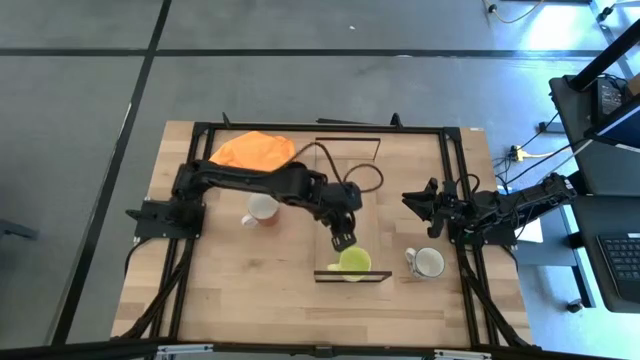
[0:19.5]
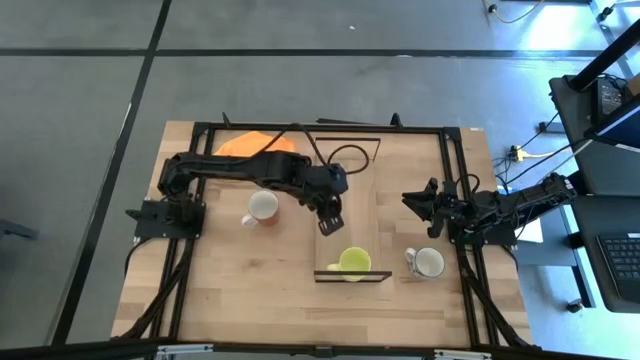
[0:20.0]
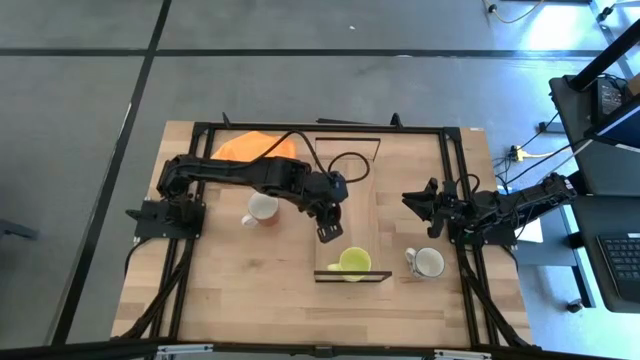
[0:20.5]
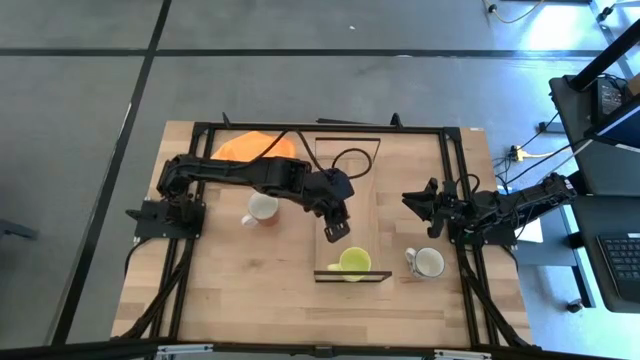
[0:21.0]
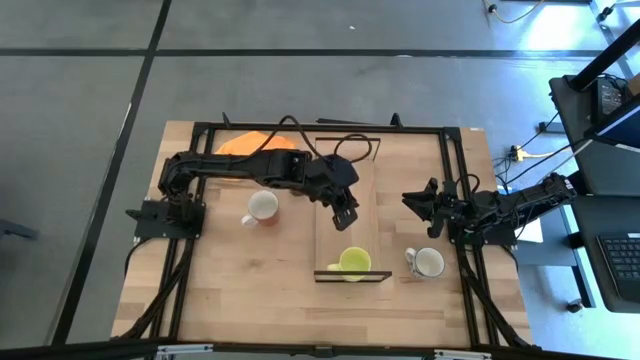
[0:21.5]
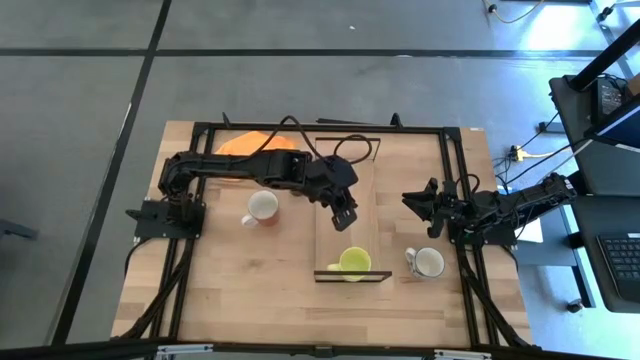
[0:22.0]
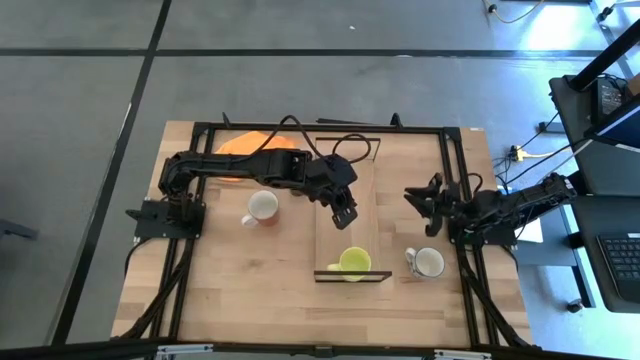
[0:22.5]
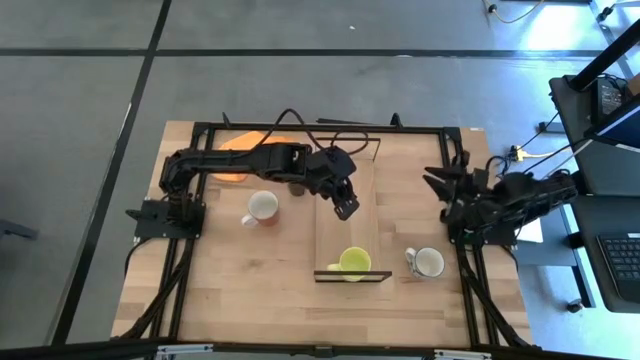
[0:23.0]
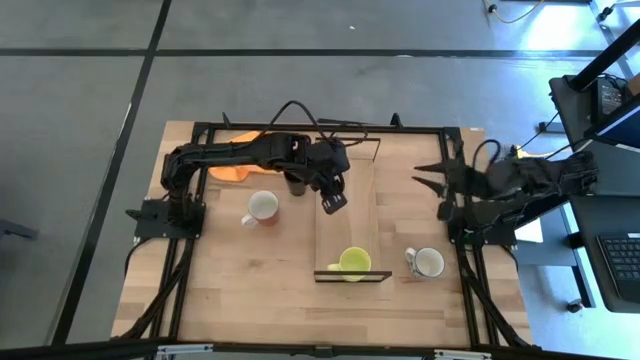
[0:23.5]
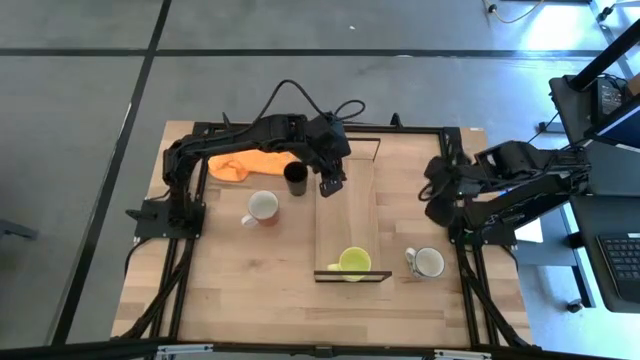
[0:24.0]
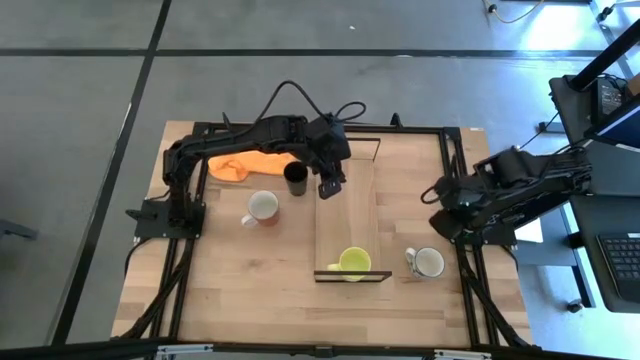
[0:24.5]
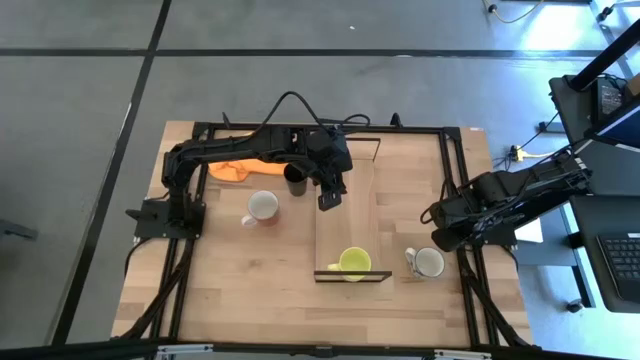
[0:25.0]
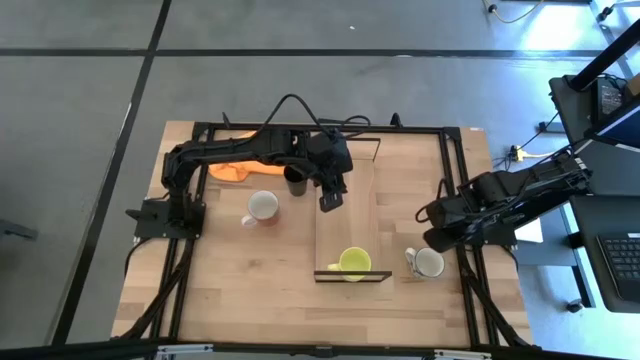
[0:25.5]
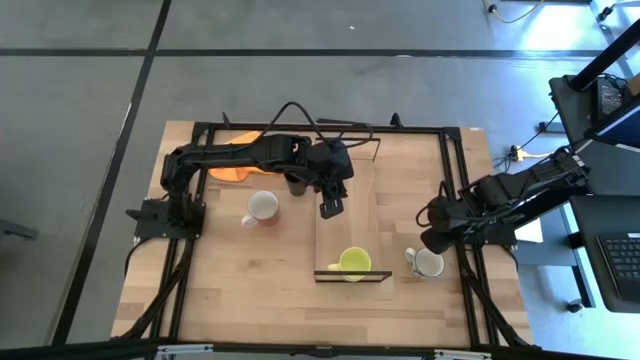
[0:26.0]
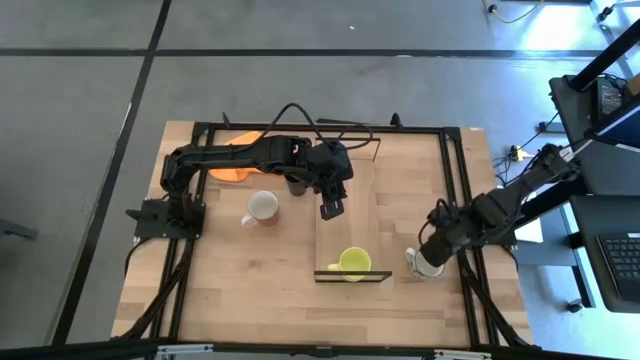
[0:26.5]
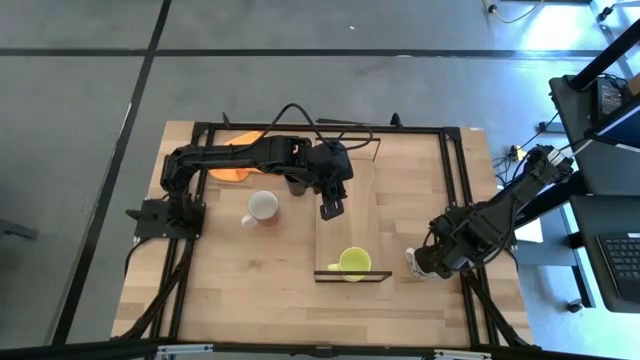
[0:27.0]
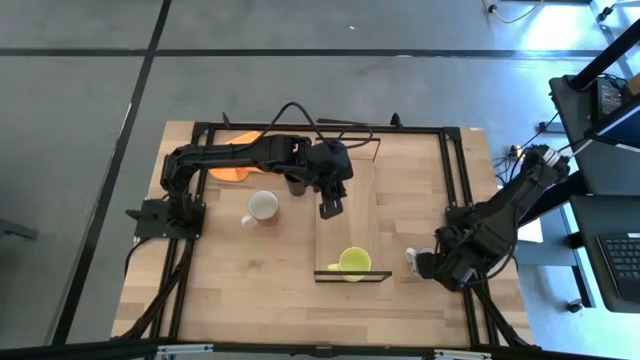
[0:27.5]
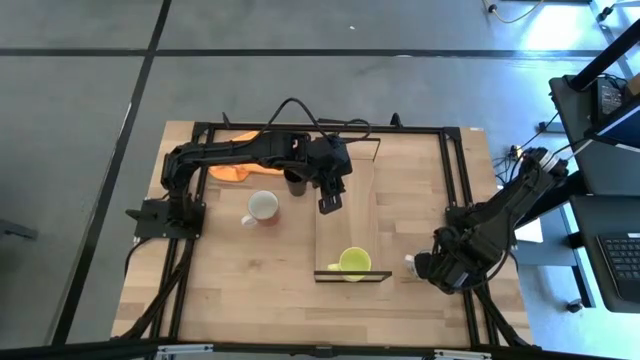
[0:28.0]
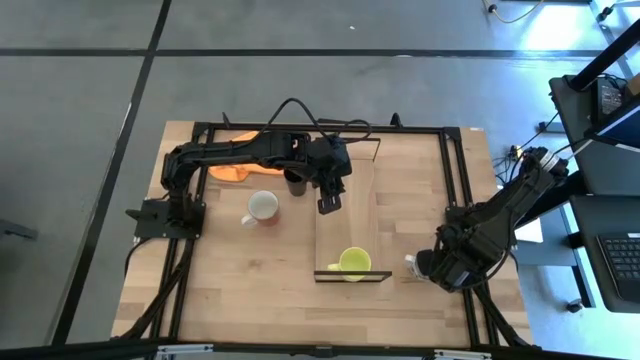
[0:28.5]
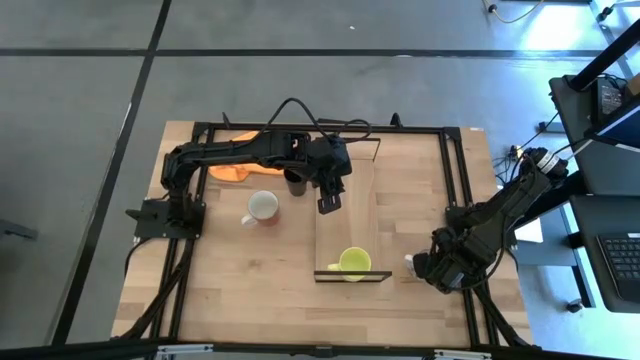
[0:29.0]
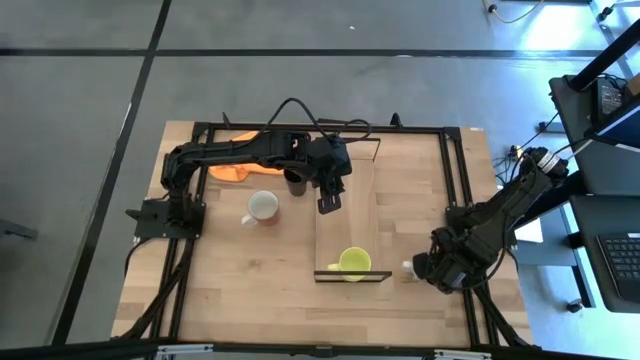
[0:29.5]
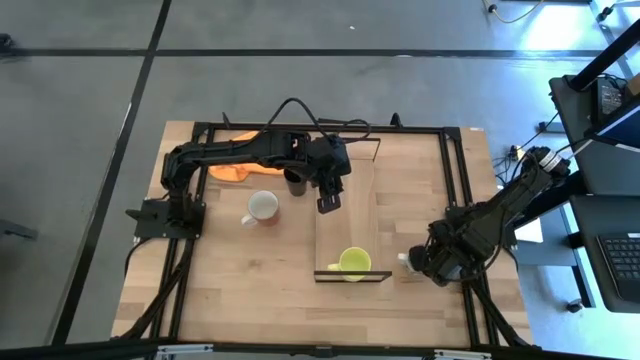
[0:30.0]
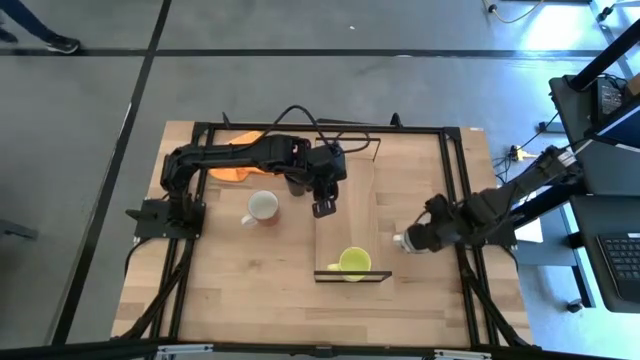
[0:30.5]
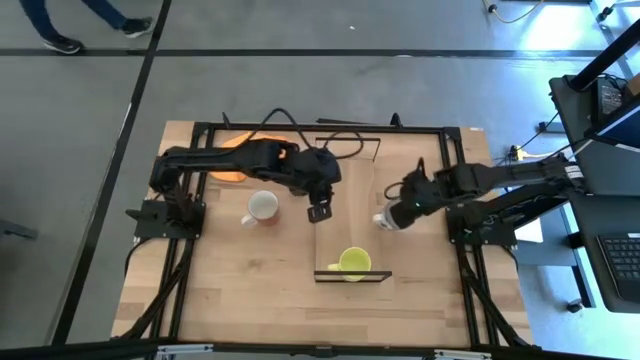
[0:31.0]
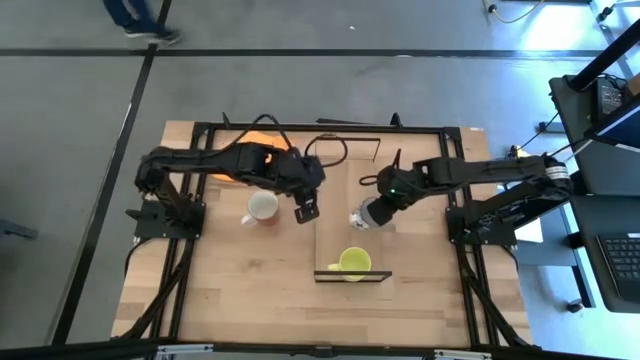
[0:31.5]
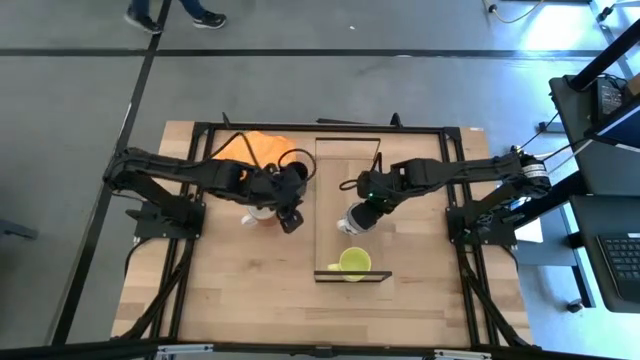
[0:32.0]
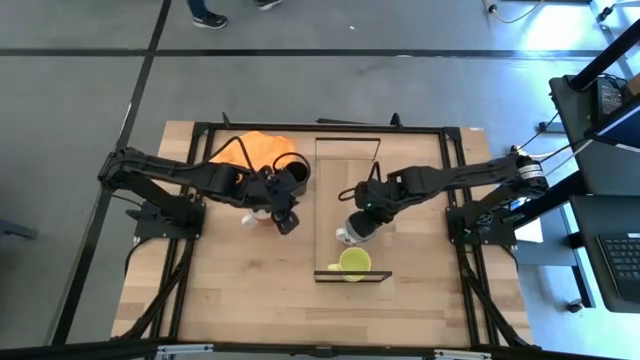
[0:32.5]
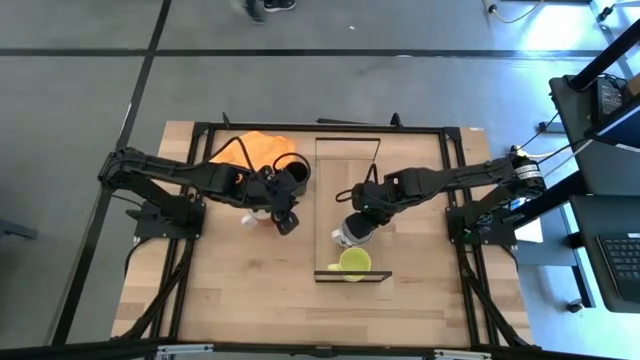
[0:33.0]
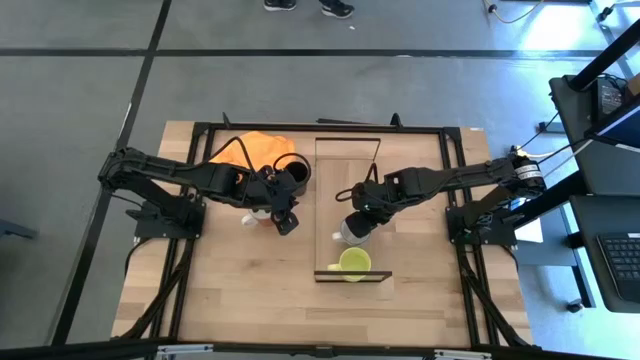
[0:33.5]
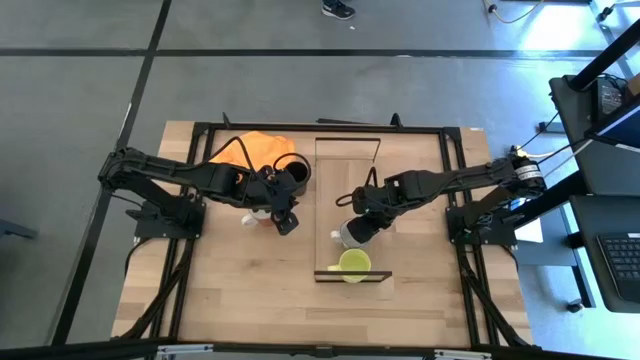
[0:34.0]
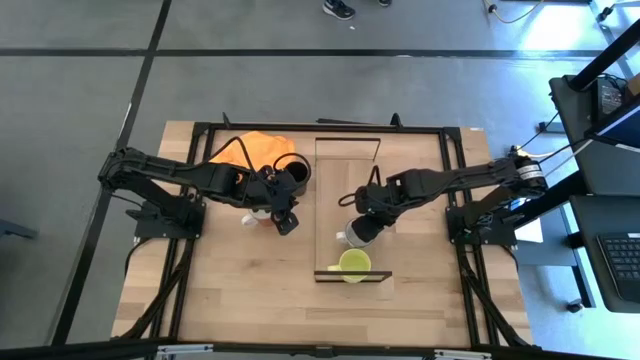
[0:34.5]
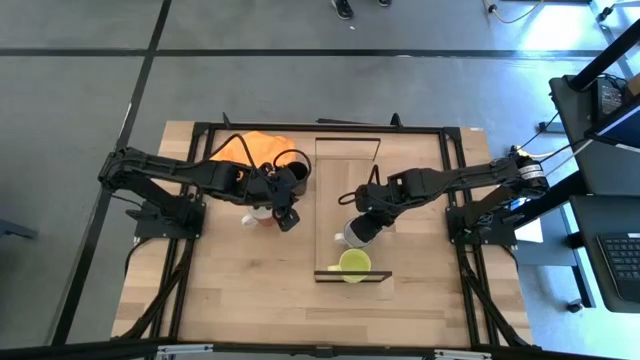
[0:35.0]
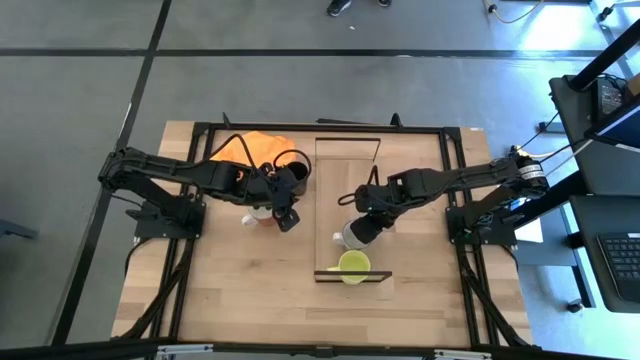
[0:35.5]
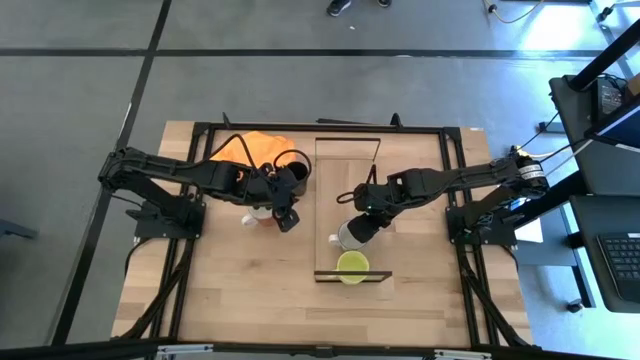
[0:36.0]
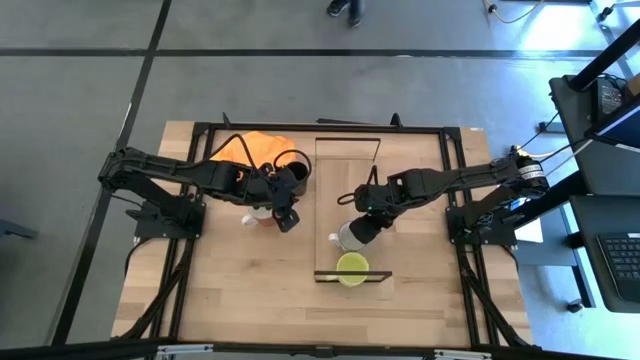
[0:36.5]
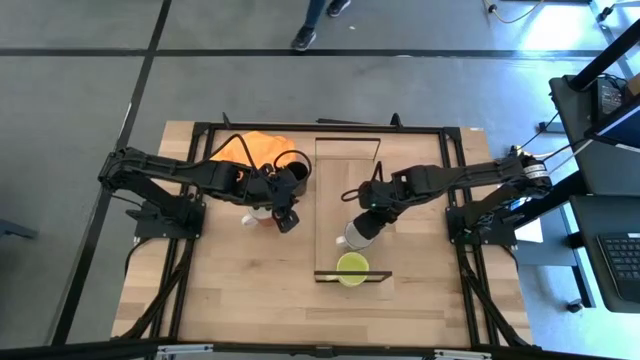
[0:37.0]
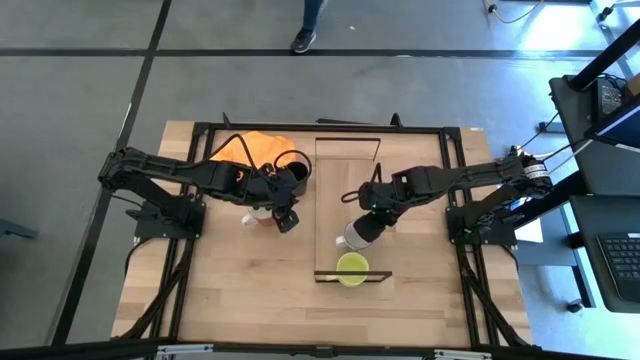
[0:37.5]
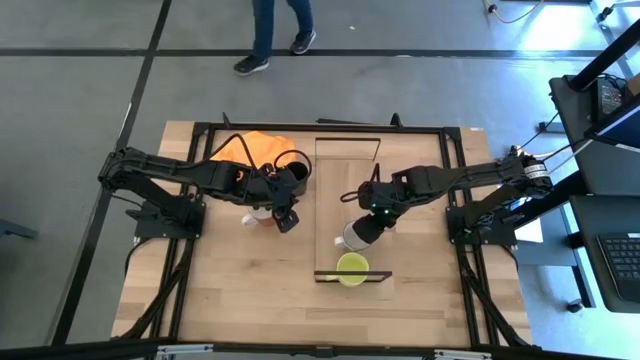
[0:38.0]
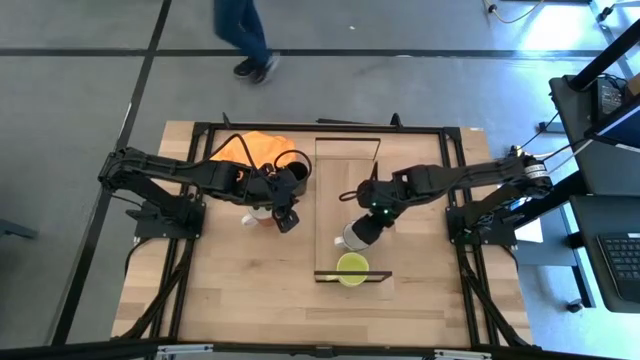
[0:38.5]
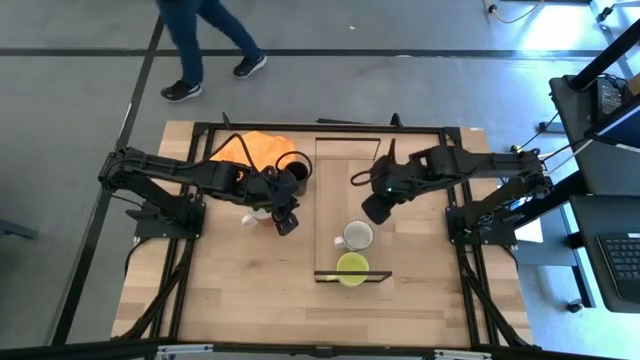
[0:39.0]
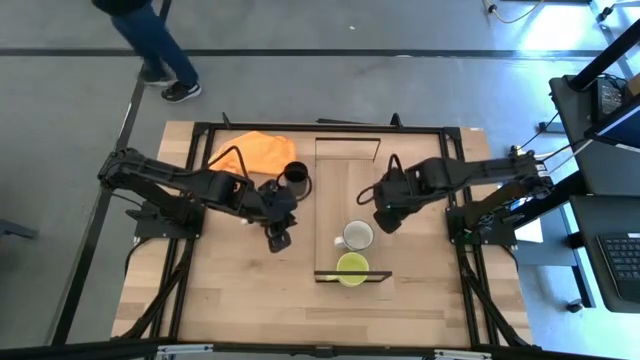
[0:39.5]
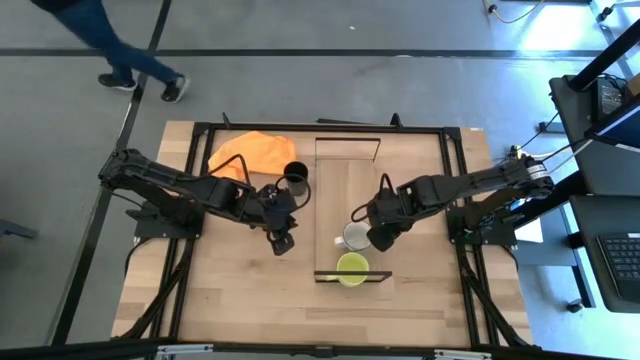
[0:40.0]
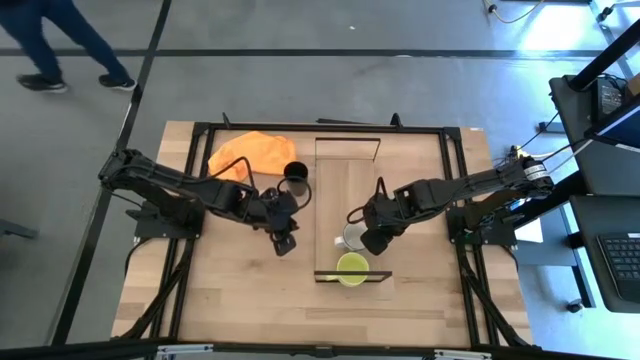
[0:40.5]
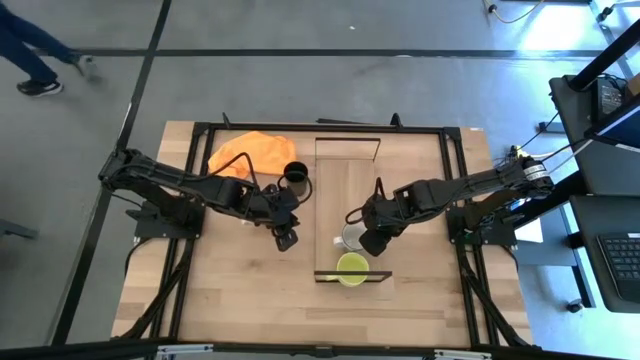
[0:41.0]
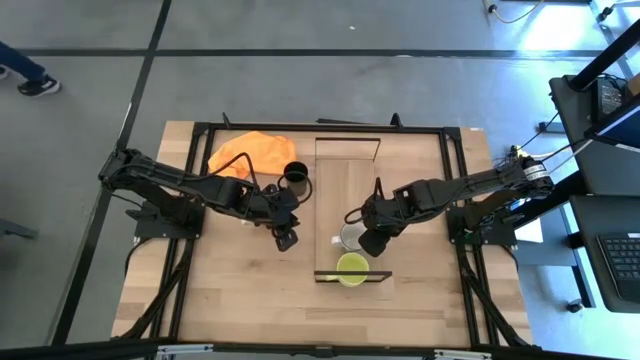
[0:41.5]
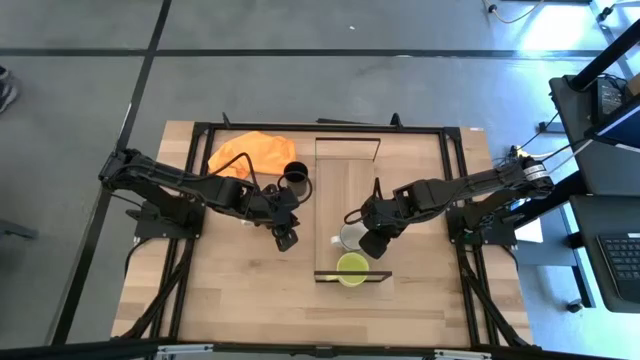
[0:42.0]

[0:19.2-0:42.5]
Task: Stack small to large cups/mugs on shelf
Put the blue patterned mug on the shelf
